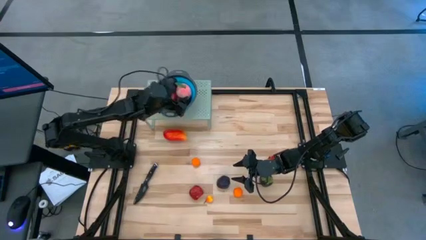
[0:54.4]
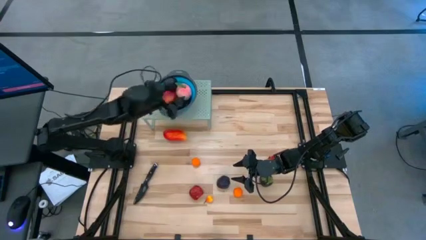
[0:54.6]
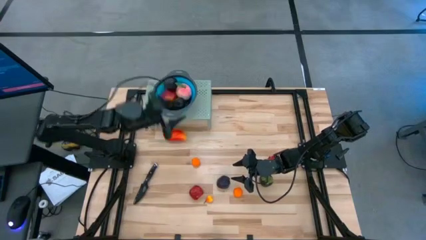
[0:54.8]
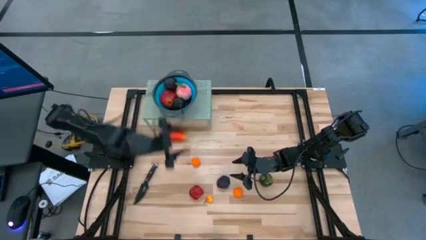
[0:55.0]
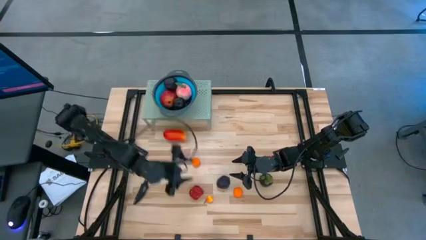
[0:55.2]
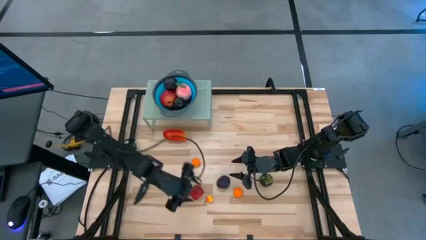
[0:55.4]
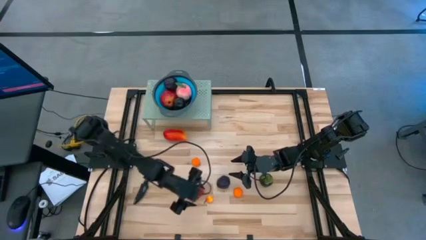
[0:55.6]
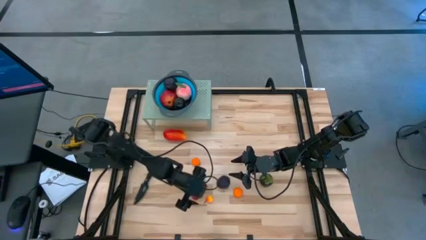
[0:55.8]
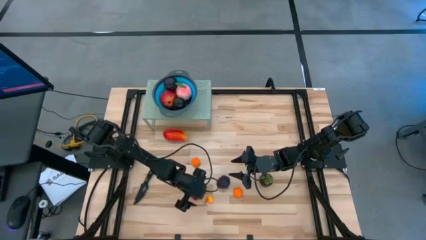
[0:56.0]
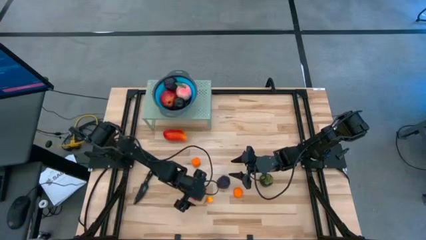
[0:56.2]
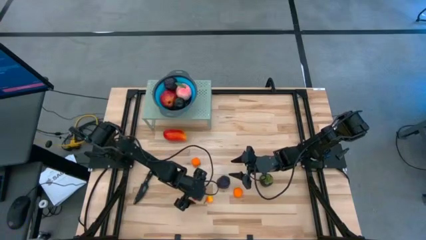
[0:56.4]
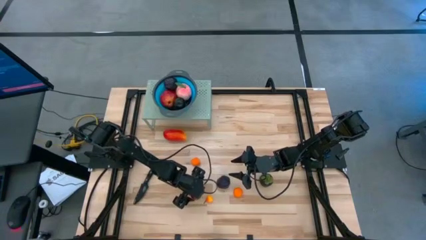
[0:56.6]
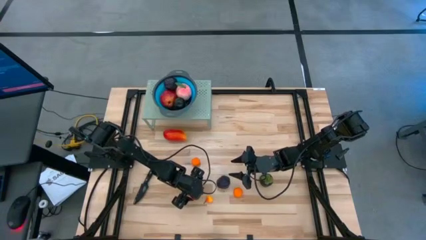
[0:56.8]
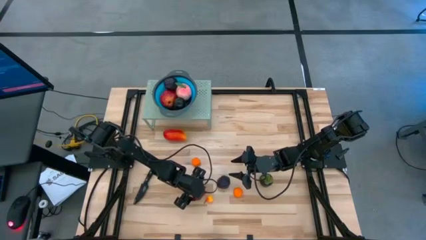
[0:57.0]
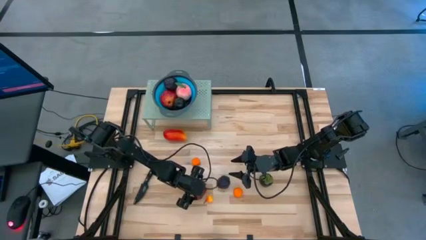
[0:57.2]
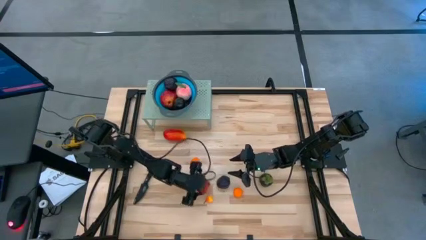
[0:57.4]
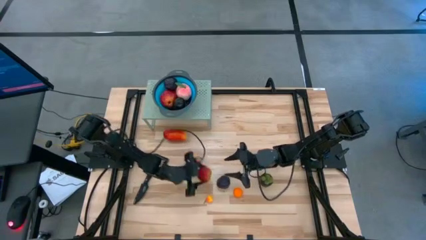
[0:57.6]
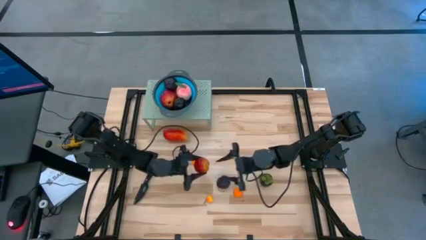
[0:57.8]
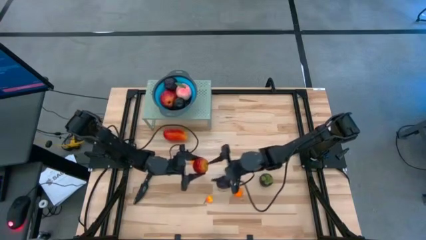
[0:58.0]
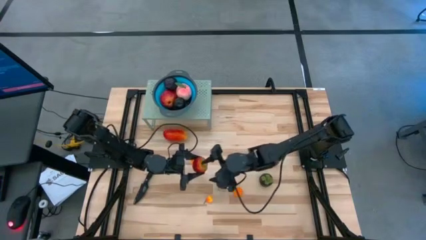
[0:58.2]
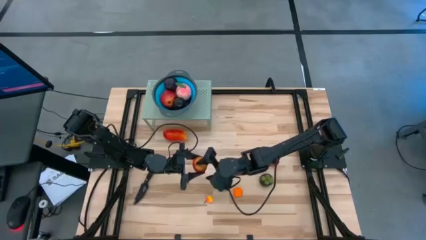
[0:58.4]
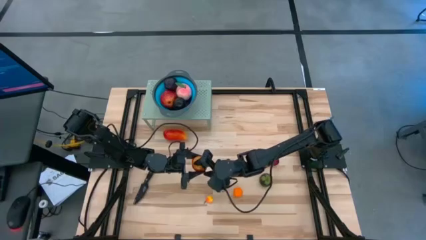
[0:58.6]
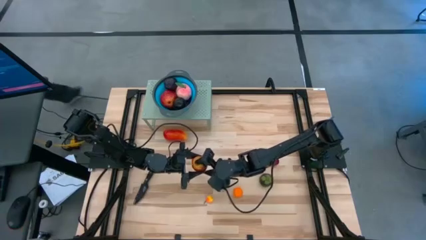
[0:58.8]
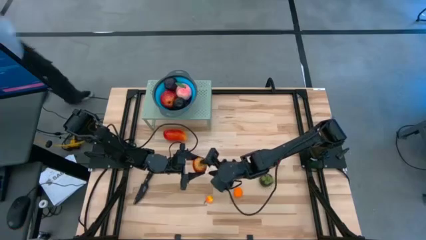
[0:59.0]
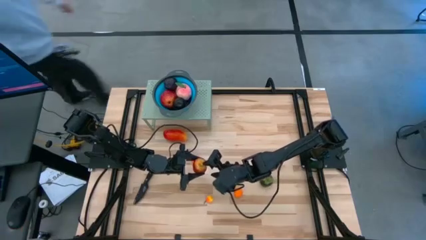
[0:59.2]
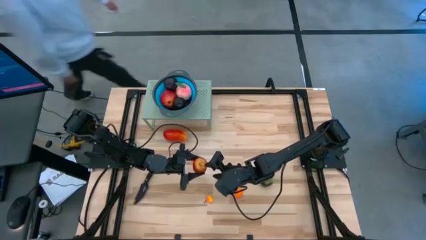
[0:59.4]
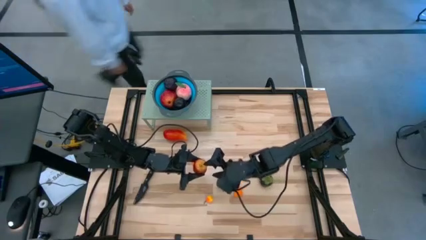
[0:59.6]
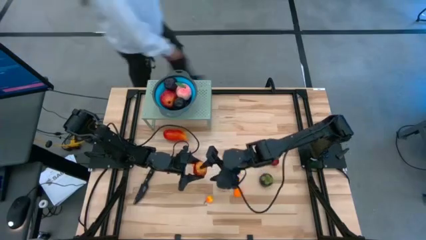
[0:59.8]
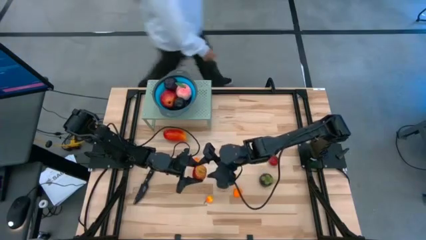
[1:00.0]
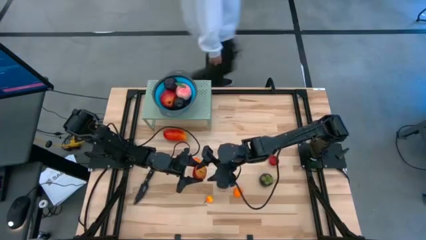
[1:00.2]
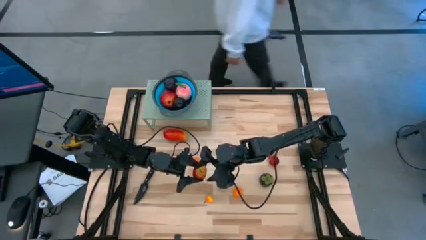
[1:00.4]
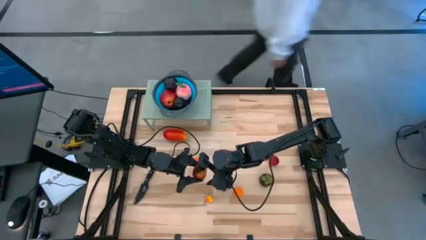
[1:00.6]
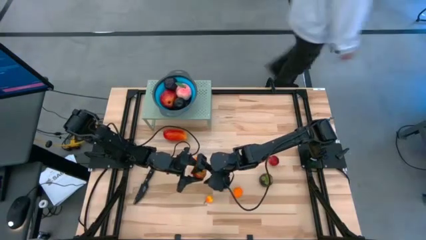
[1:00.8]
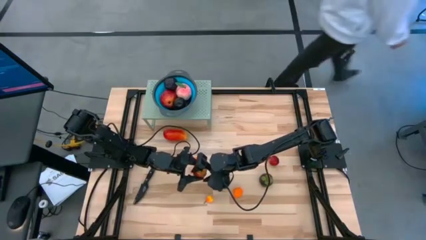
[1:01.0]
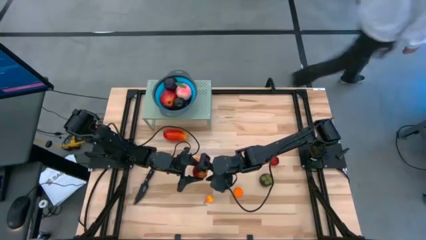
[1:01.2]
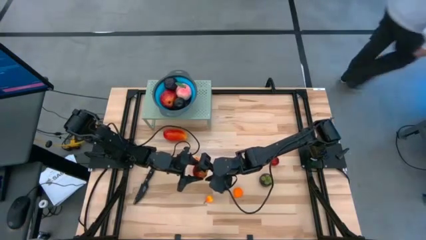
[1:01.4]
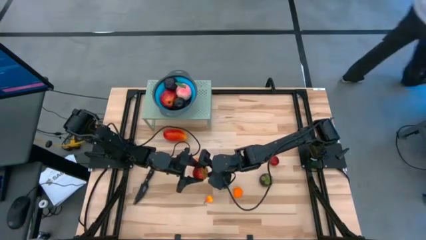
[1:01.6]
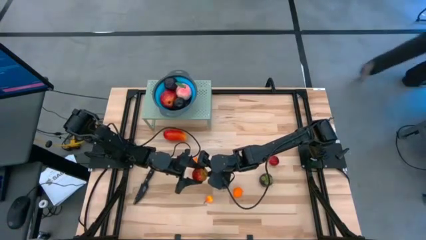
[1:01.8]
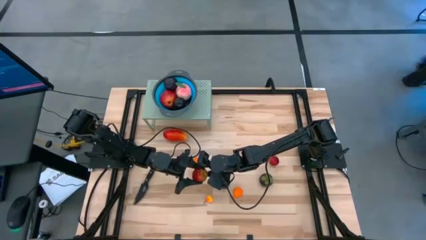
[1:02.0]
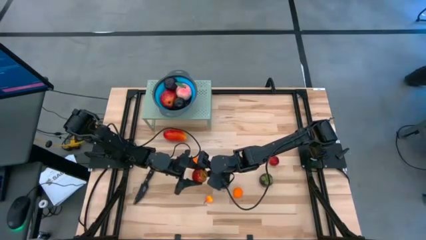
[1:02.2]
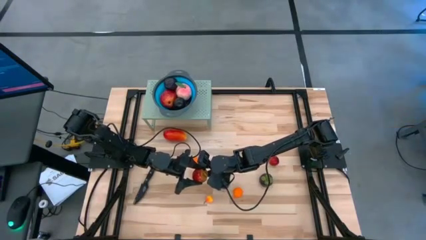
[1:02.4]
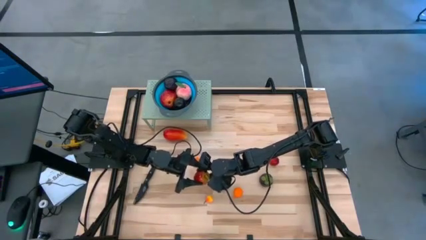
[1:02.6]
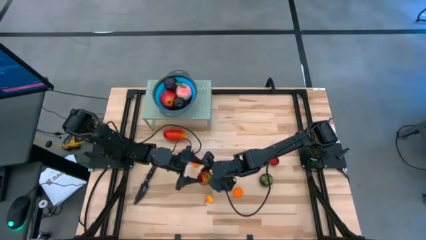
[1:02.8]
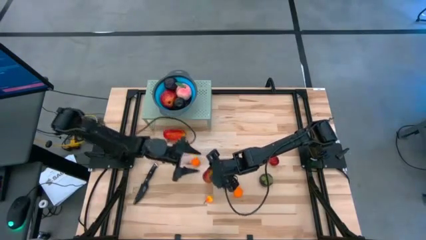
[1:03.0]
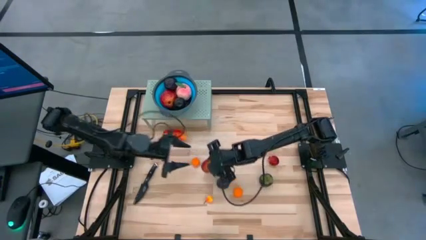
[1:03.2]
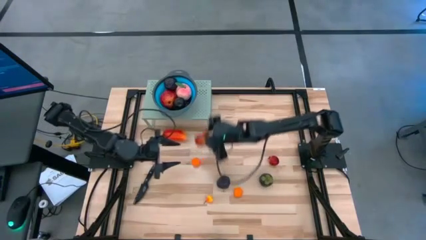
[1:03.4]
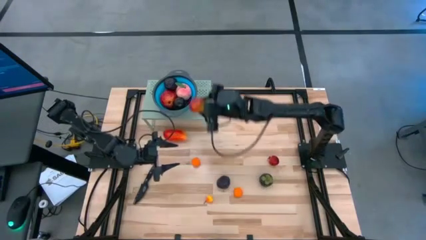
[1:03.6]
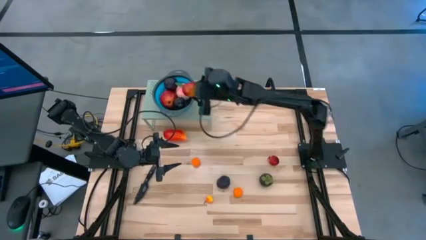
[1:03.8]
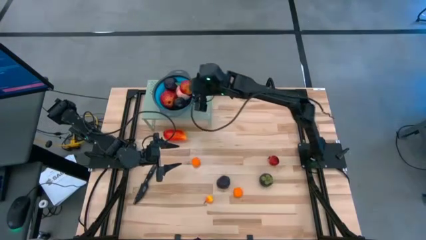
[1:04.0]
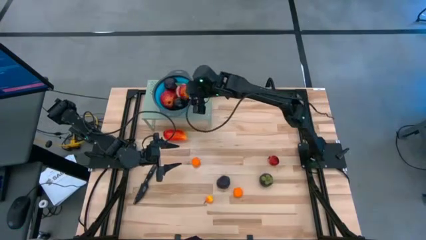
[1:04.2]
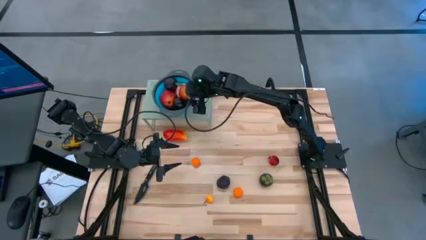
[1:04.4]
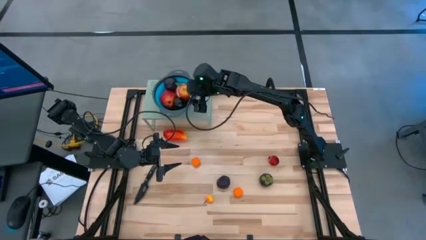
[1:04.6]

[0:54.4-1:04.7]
Task: Pick & Place Fruit
Put the red apple into the blue strainer bowl on the shelf

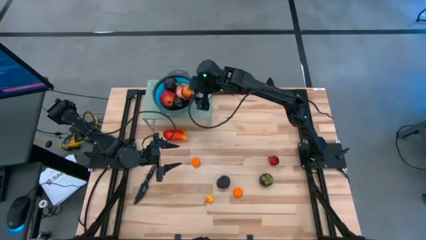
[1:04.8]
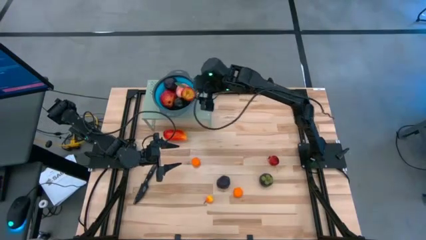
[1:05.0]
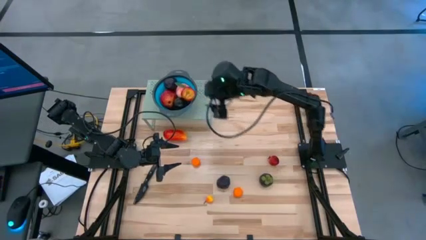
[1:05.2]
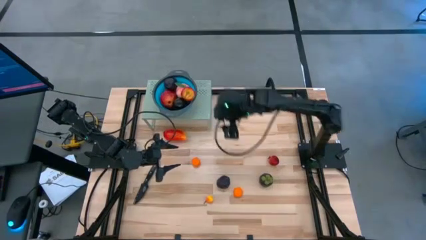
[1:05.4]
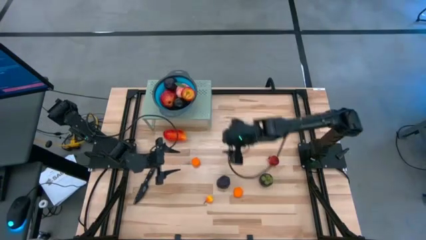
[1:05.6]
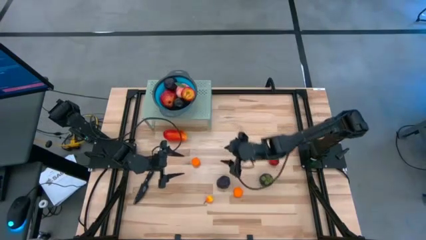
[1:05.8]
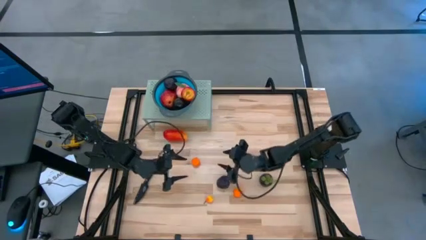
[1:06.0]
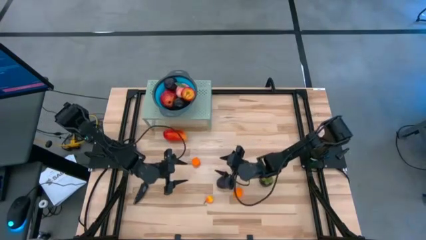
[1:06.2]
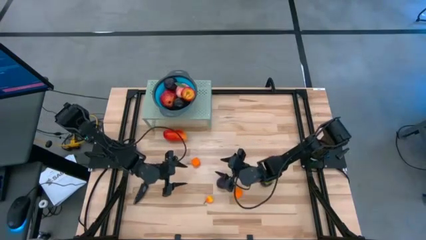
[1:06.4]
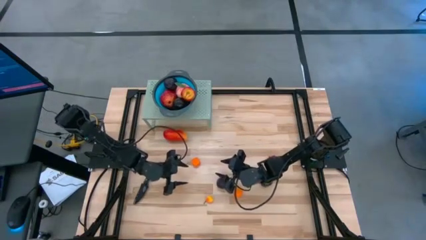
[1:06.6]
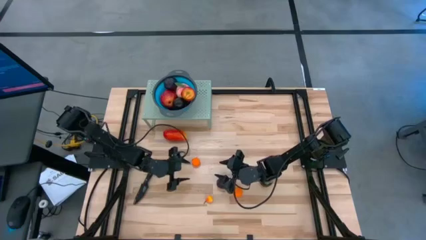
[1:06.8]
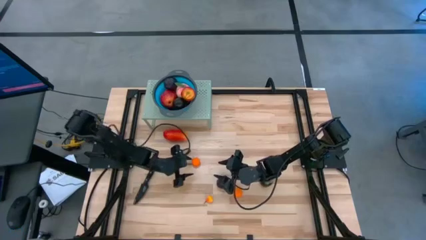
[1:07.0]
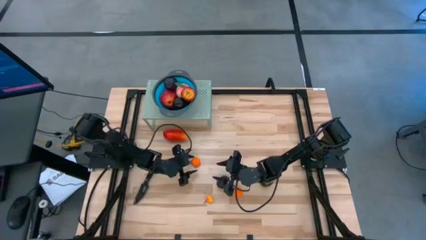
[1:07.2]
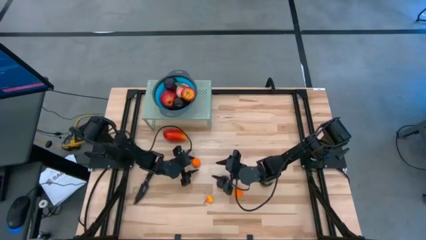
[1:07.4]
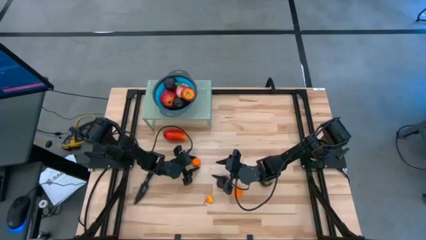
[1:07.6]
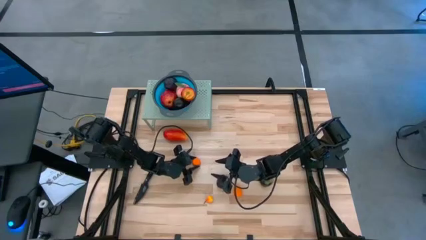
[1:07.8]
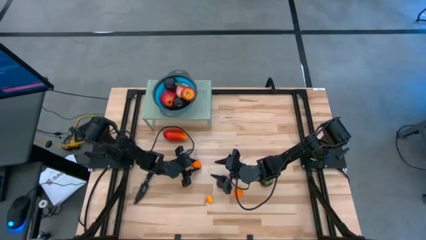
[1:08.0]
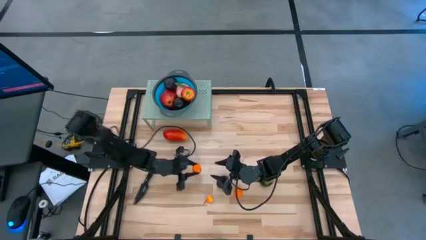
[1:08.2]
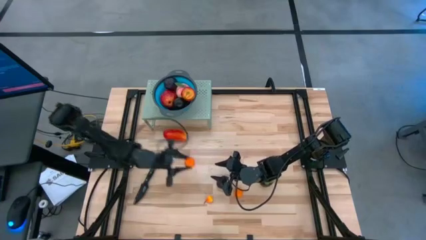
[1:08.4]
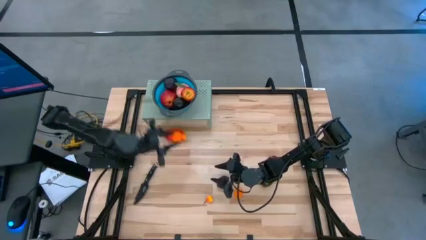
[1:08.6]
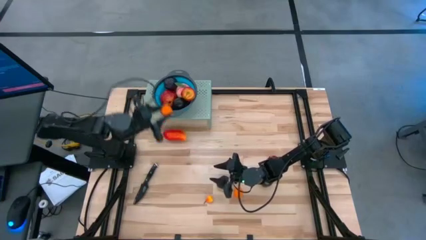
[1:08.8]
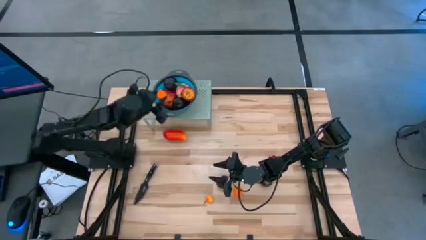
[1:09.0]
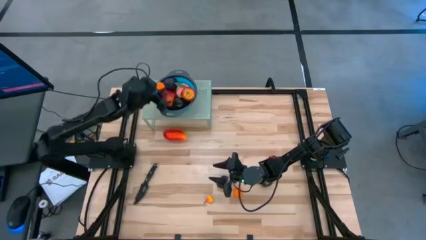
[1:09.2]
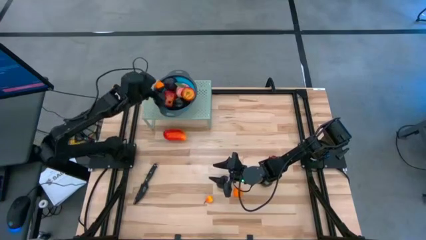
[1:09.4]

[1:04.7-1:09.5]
Put the top orange tangerine into the blue strainer bowl on the shelf

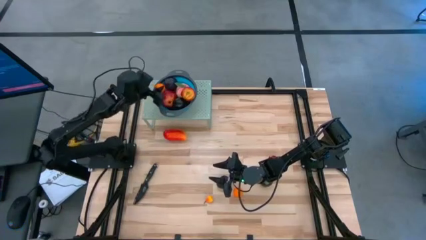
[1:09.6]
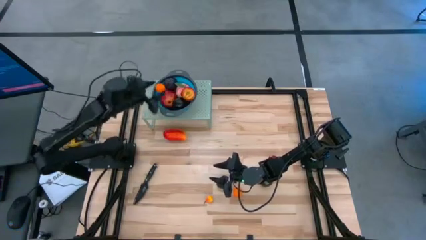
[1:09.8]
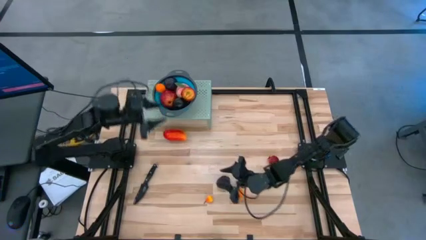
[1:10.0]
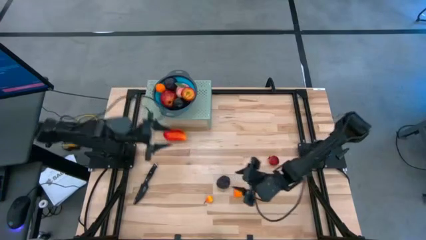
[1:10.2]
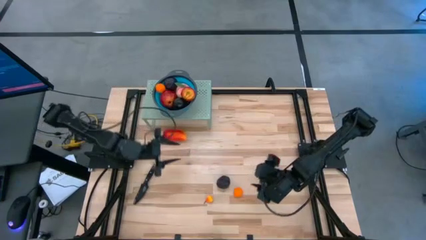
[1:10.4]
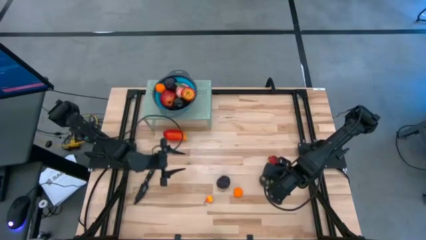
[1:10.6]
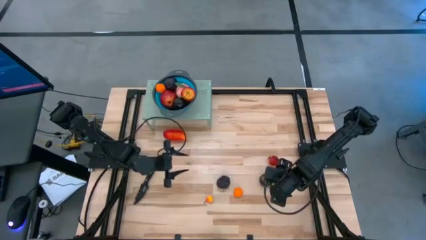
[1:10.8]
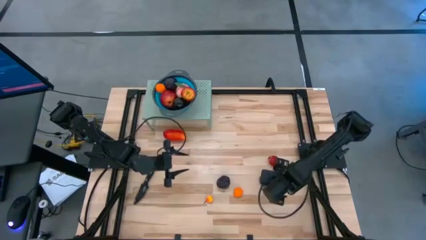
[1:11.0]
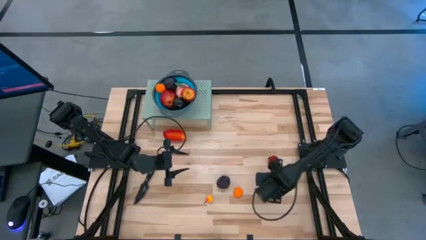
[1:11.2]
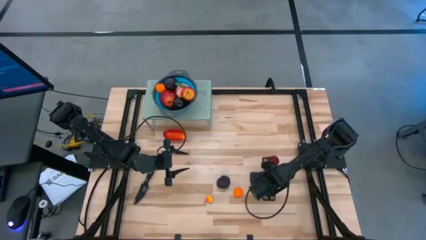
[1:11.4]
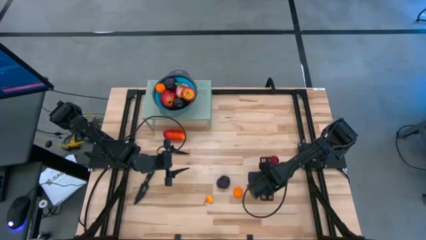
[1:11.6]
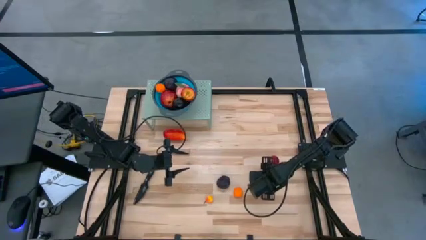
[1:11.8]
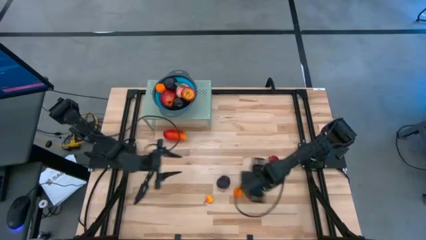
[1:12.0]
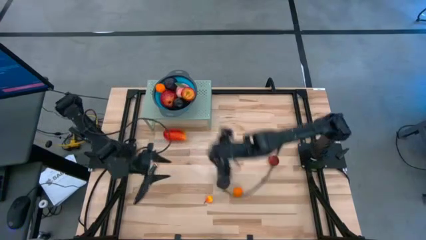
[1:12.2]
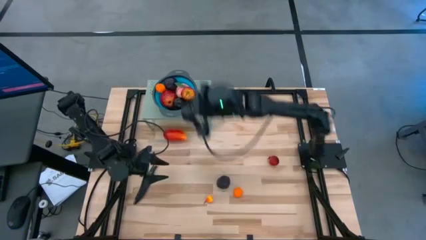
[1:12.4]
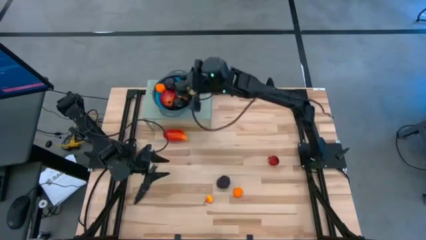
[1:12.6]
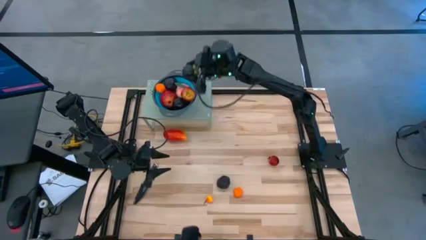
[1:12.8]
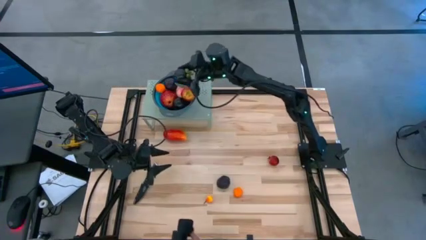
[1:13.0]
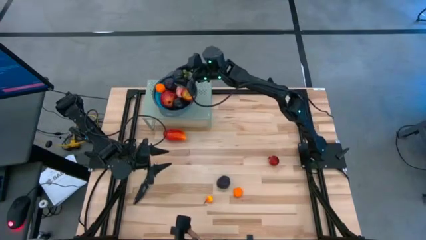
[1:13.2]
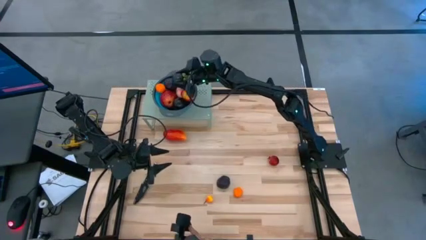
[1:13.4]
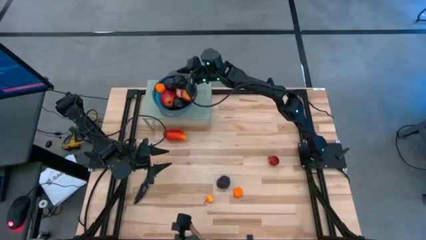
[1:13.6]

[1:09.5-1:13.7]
Put the violet mangosteen into the blue strainer bowl on the shelf
